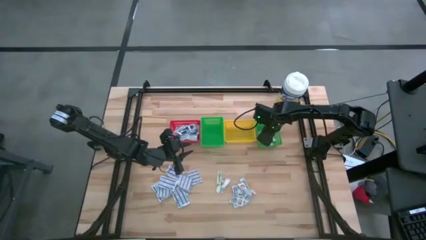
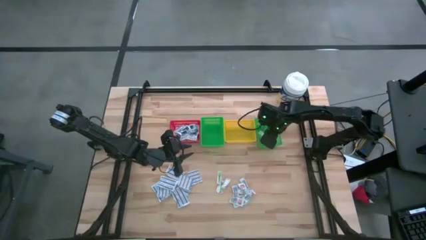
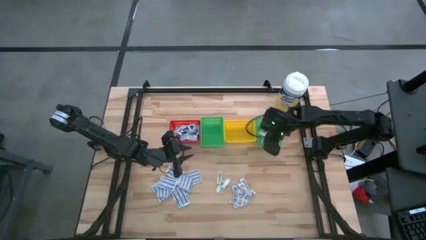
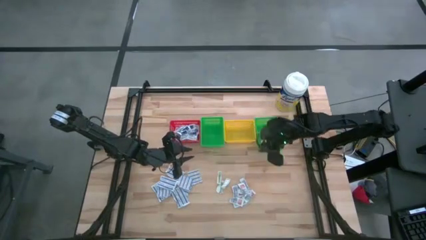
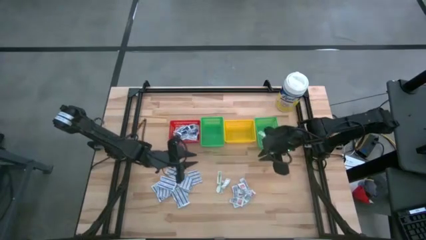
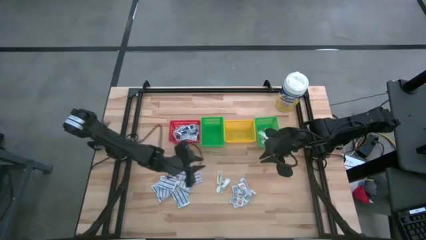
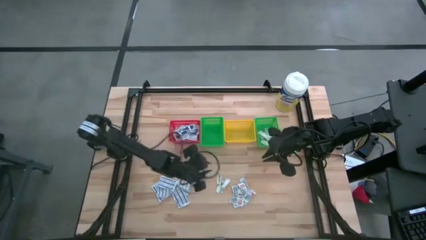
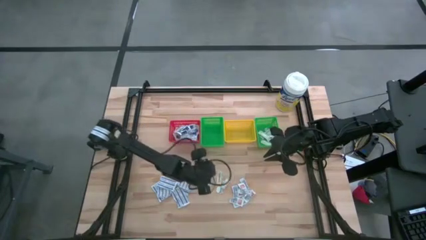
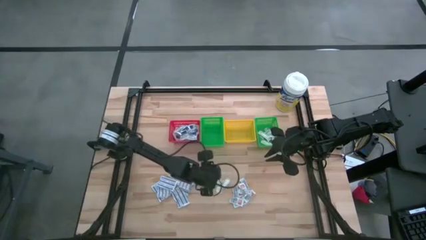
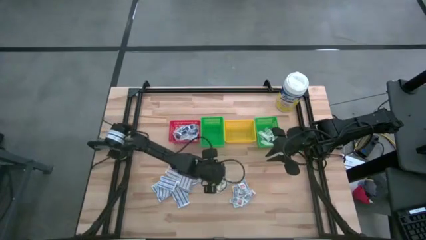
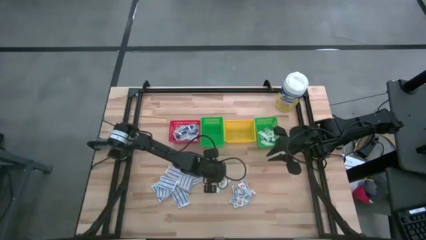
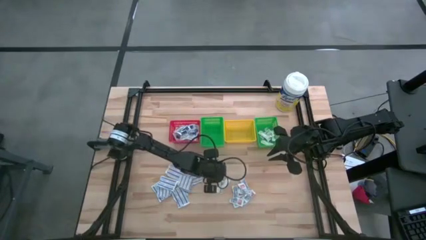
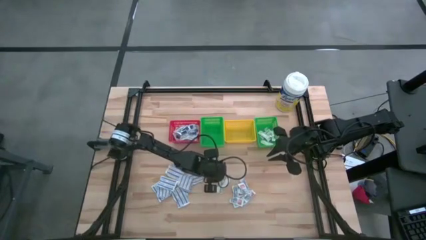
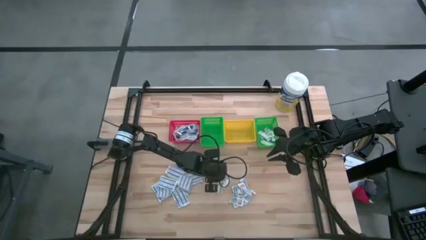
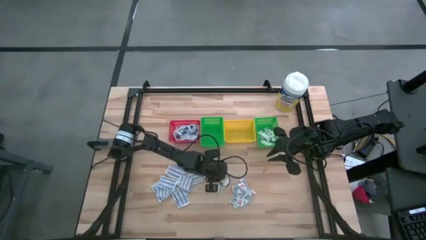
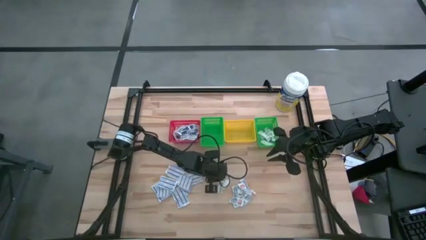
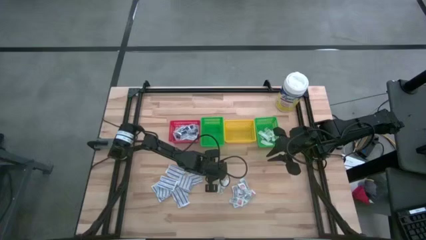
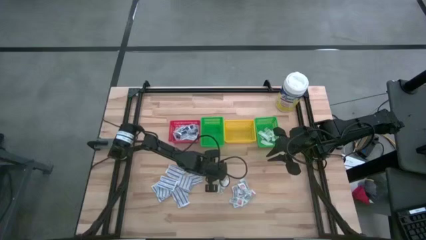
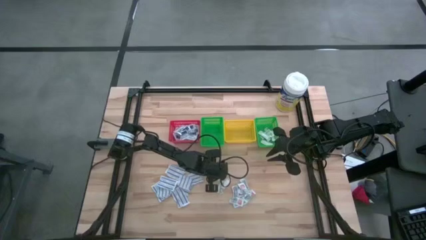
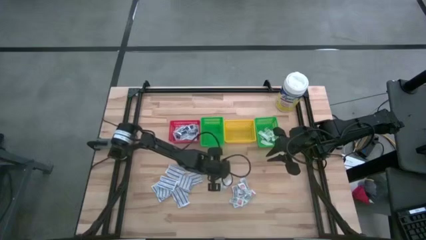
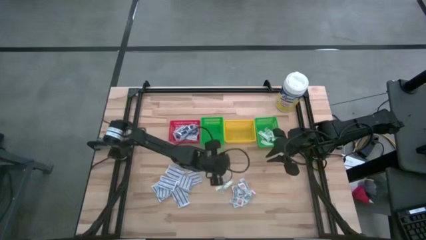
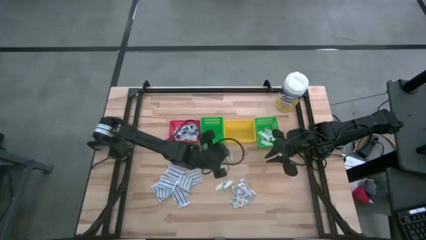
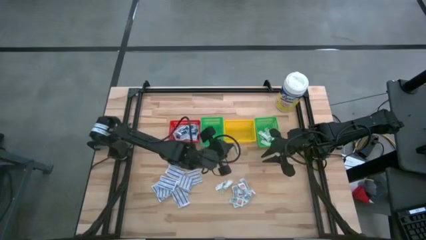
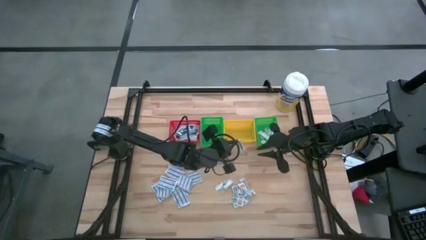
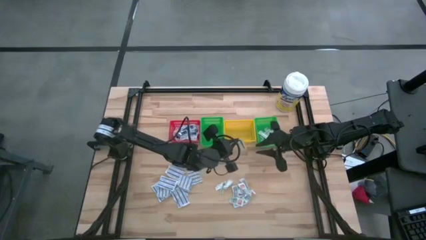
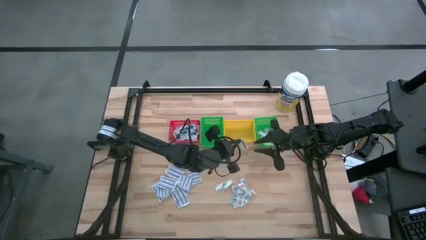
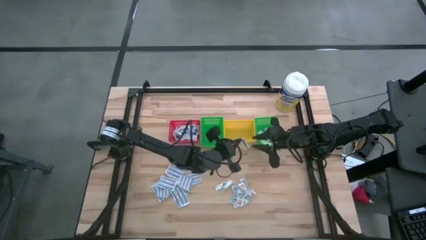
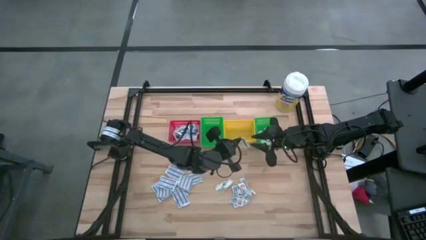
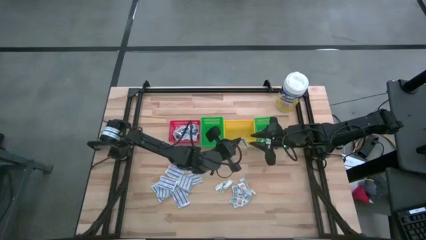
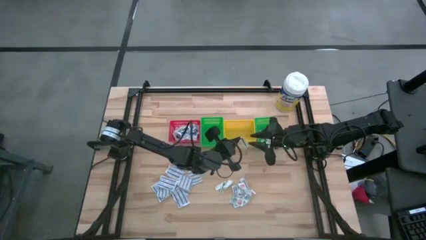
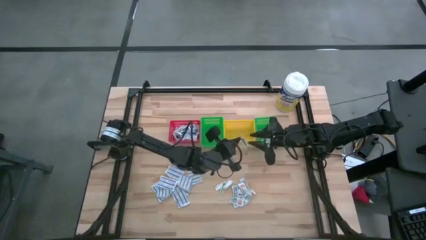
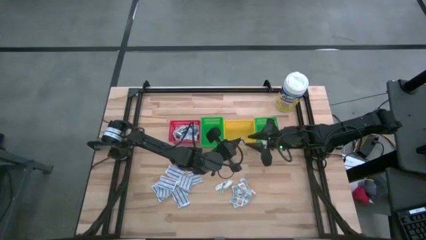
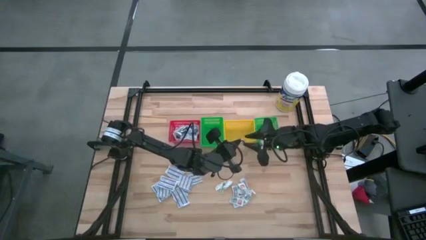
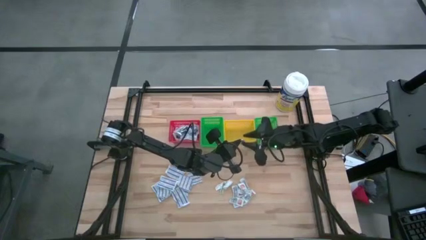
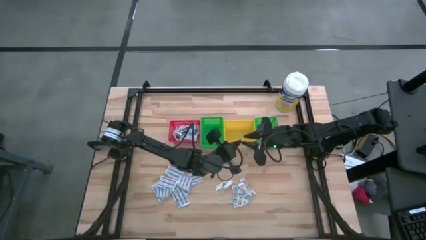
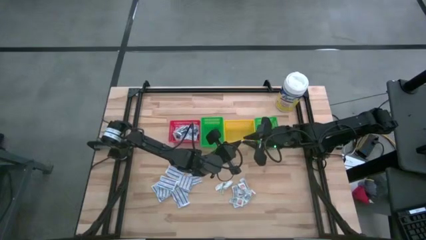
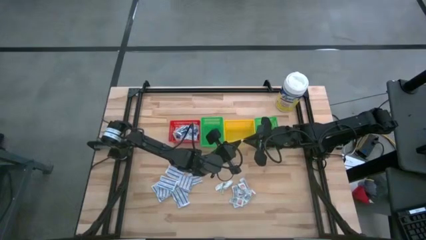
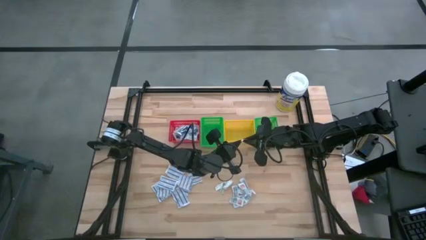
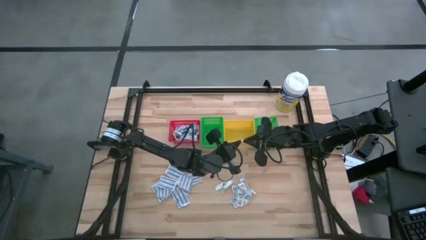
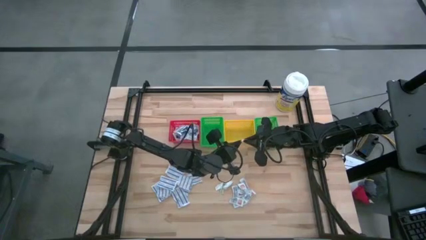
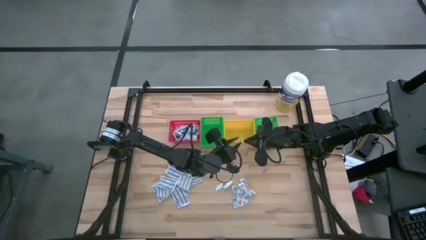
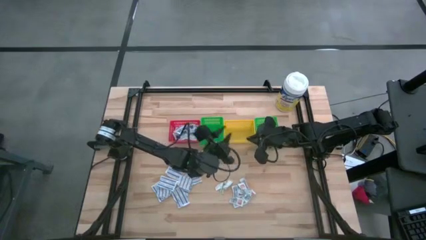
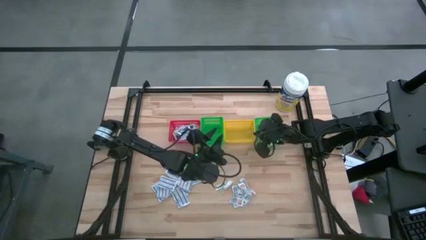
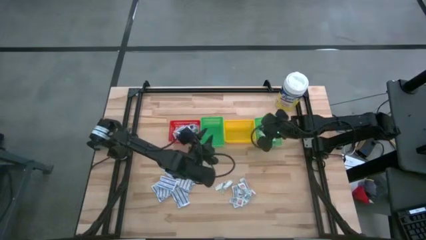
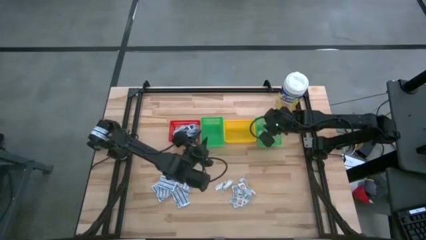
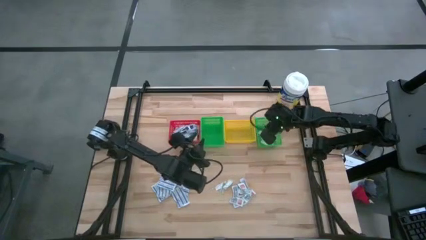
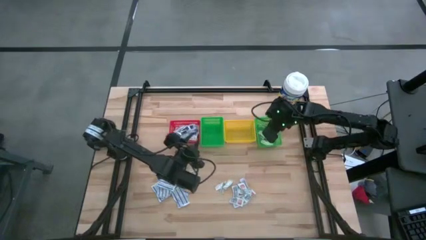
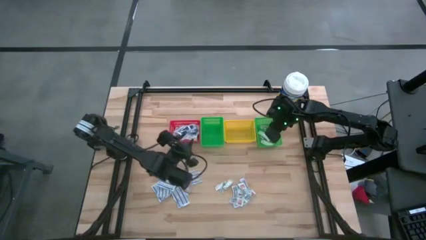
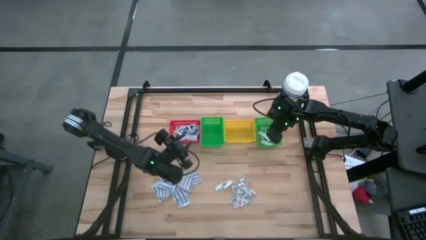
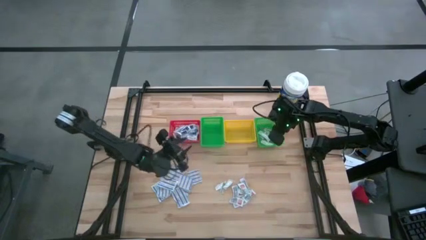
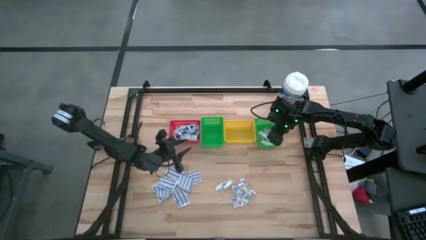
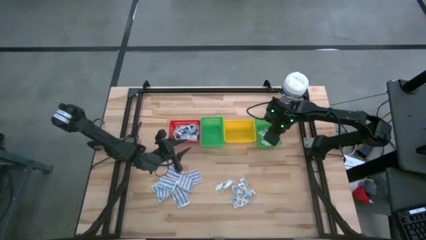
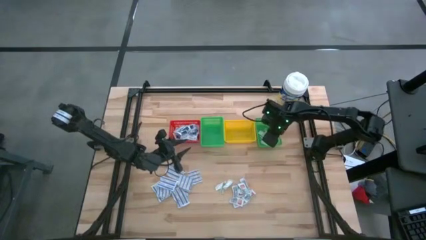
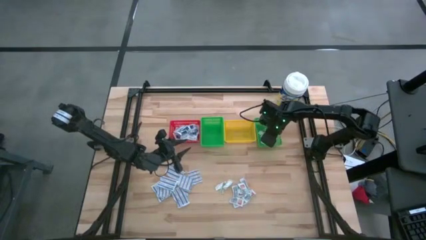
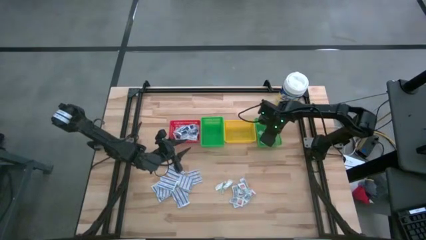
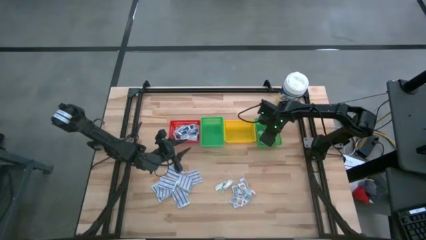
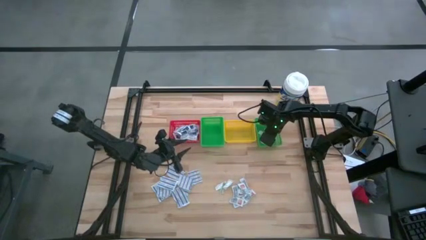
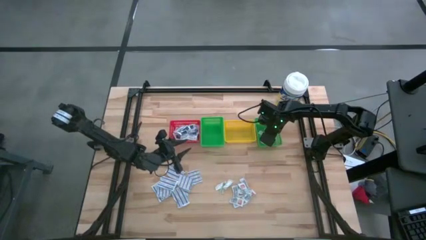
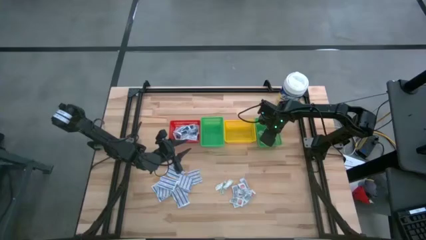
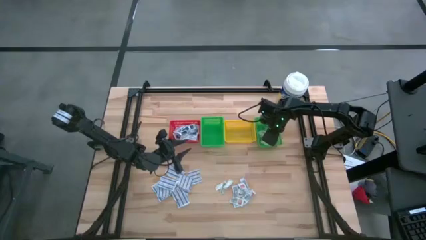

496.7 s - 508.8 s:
Task: Pick & Place First Aid Supplies
Put the green bandage into the right green basket

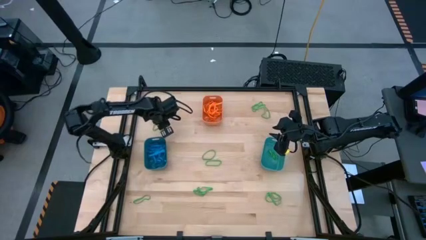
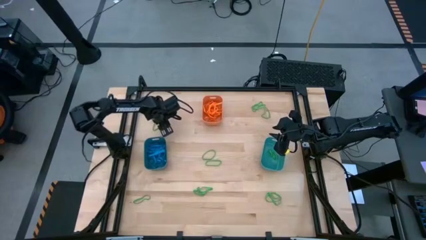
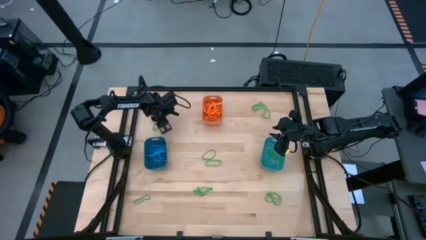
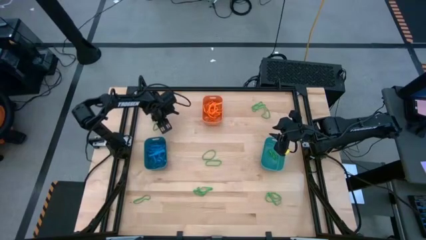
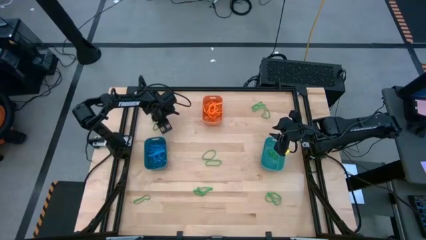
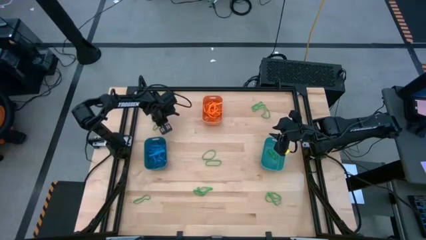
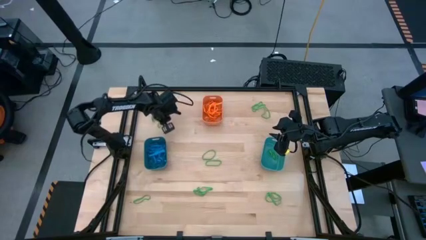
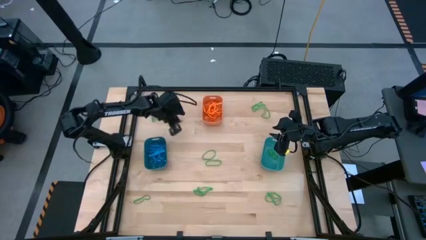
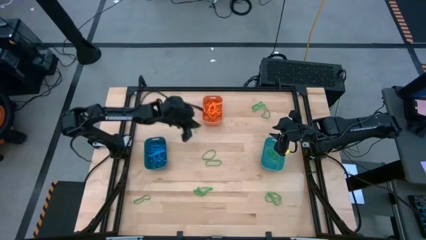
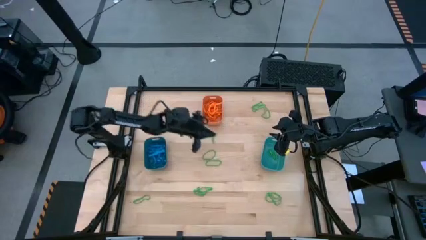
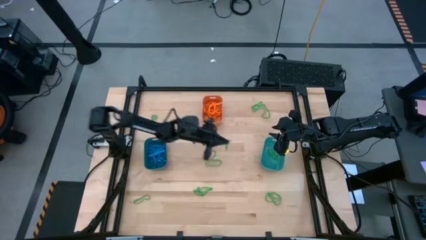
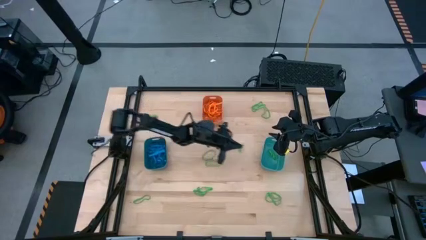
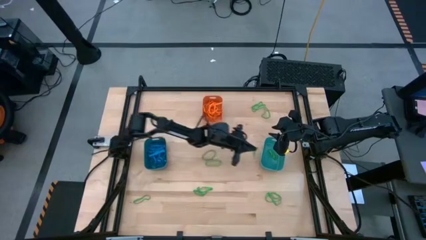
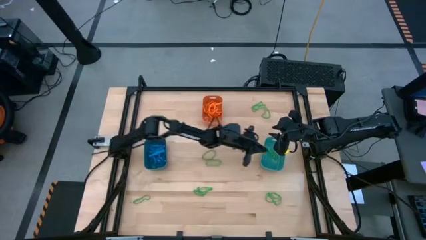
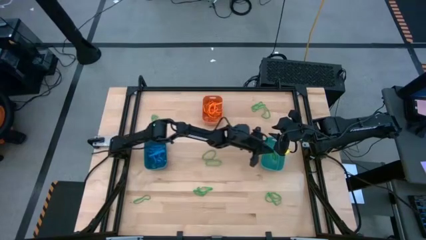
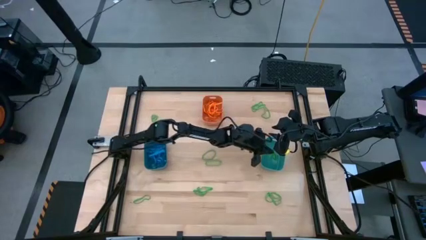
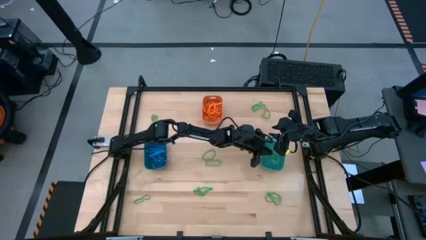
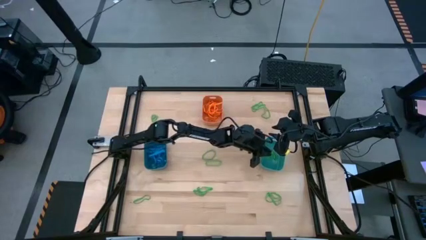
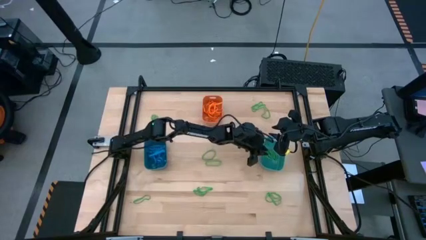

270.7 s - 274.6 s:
Task: Sort rubber bands into baskets
Put the green rubber band into the green bin
